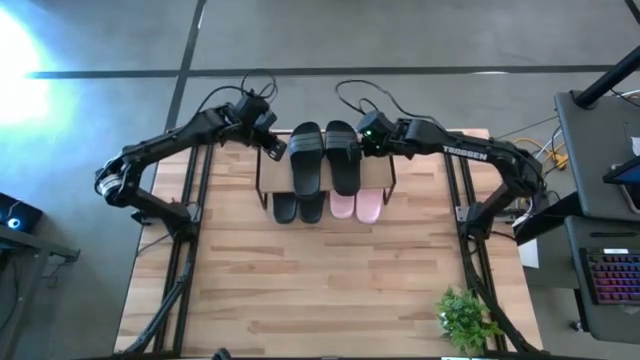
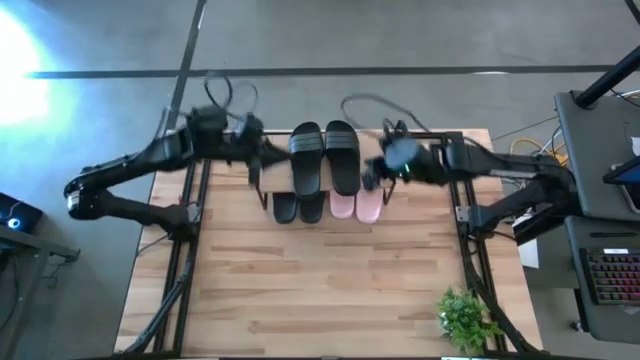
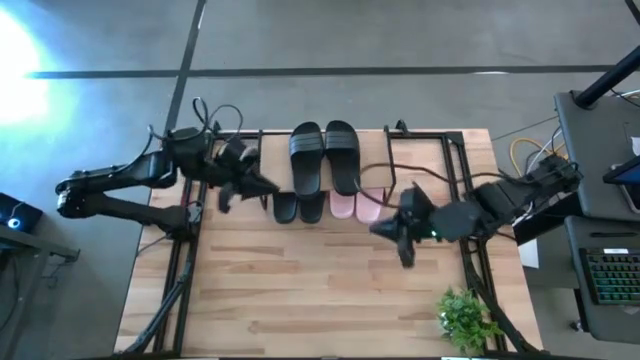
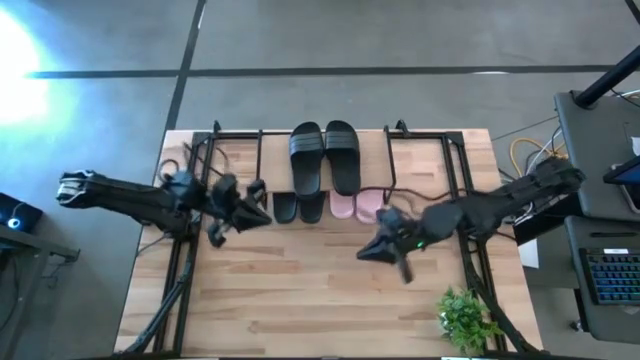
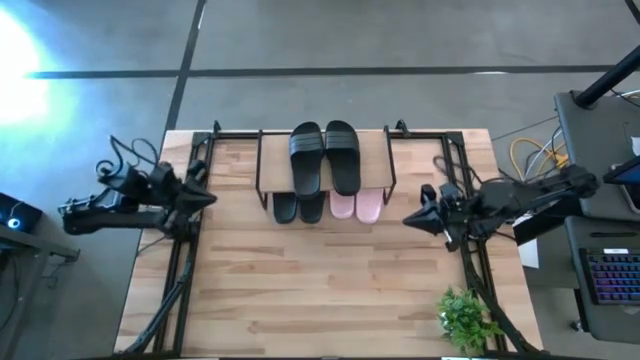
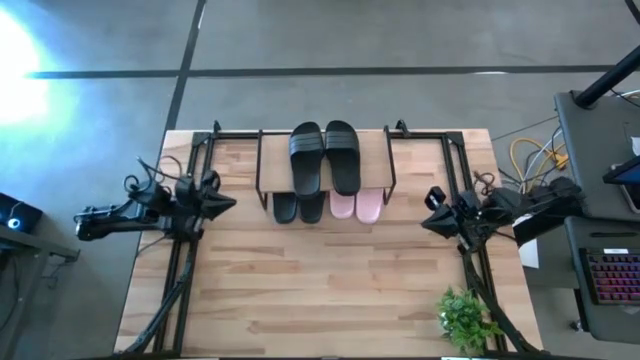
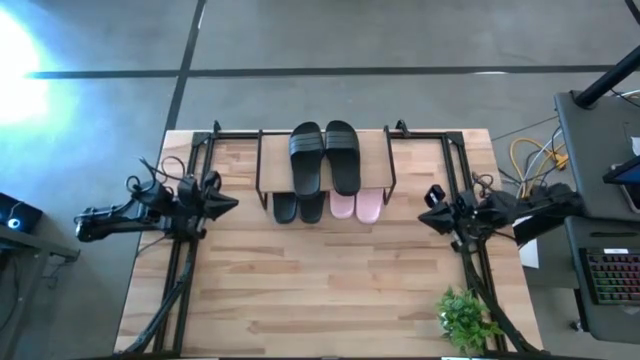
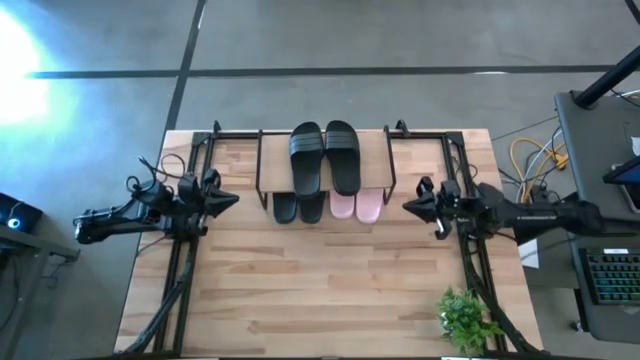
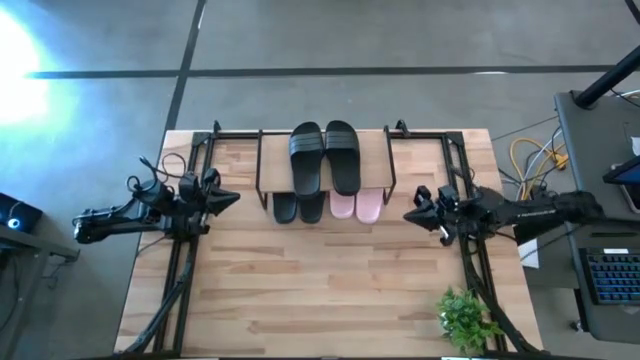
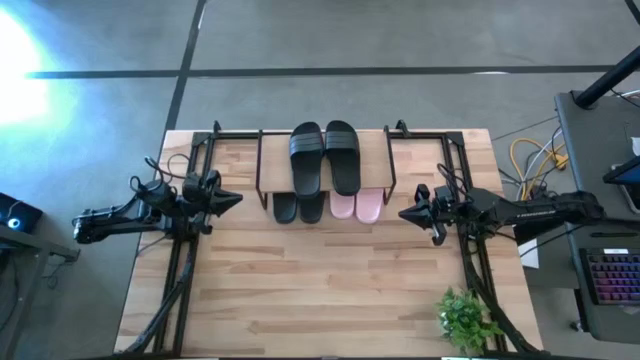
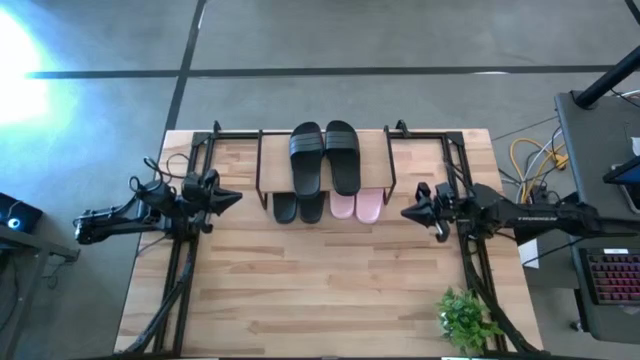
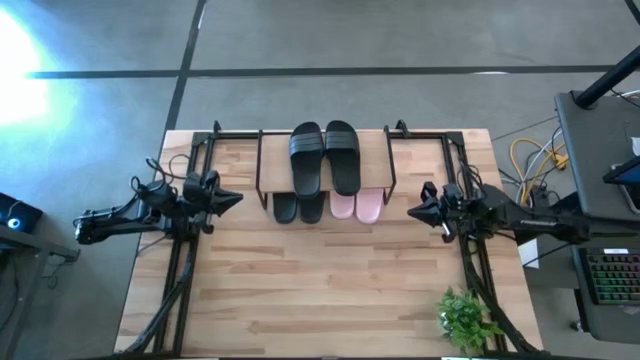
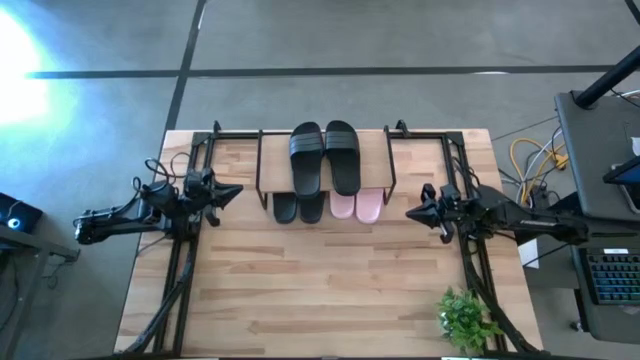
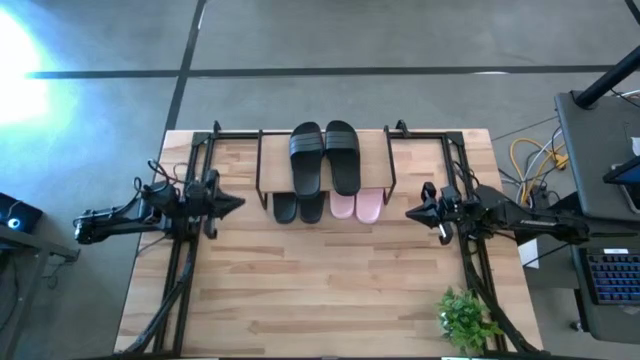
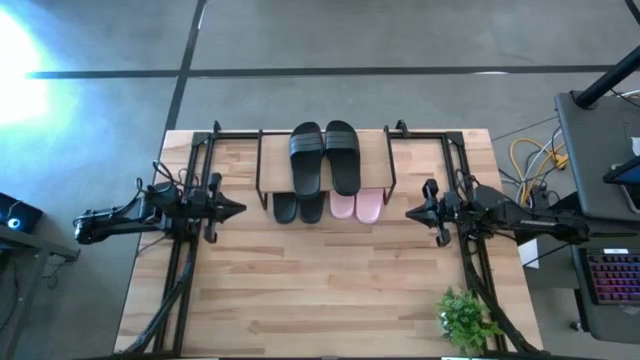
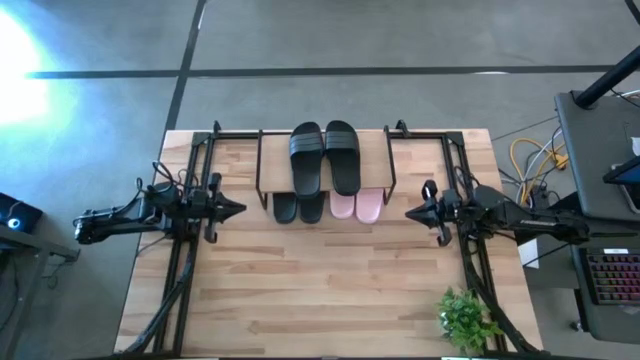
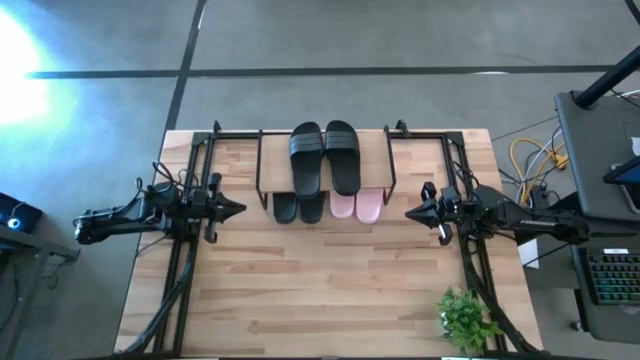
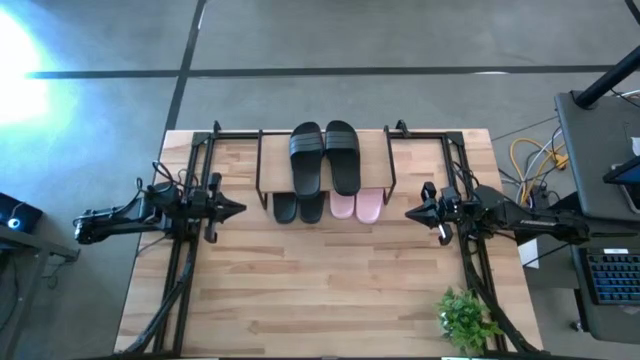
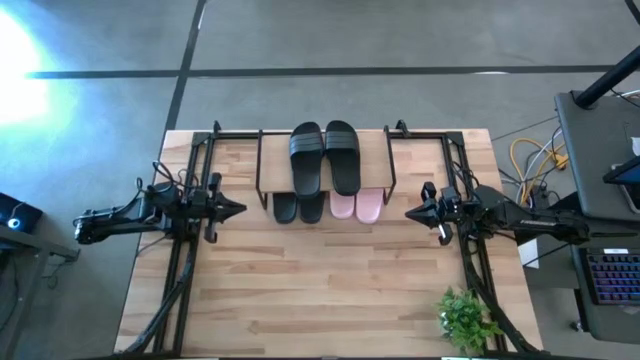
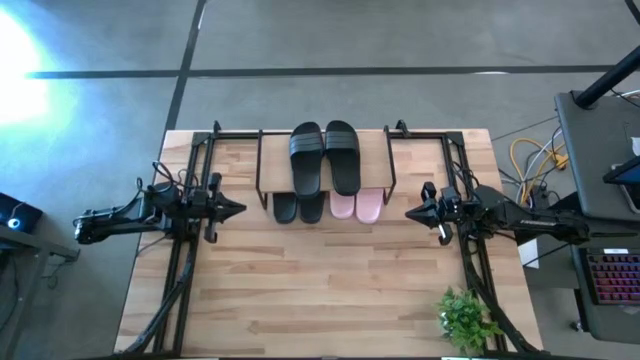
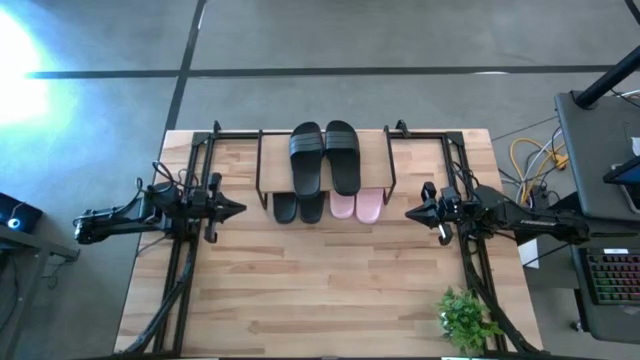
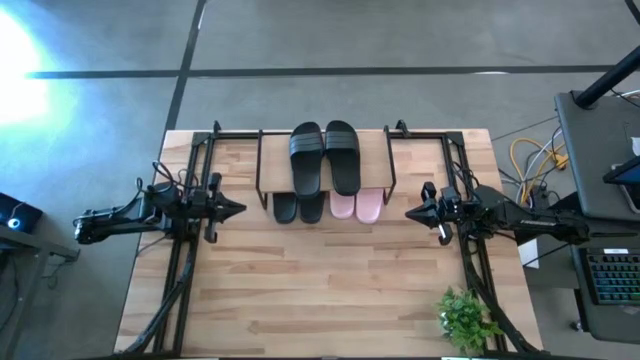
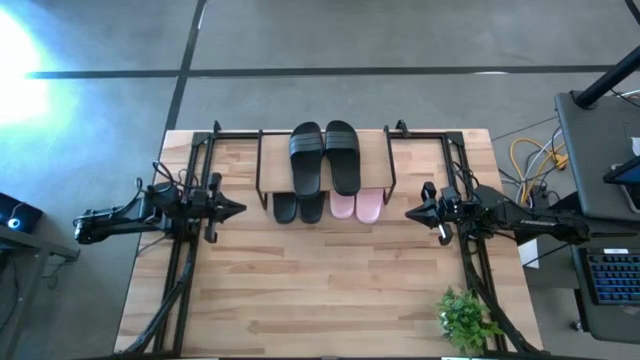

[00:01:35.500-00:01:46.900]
Task: Pick and place slides into the shelf
Return to Home Position

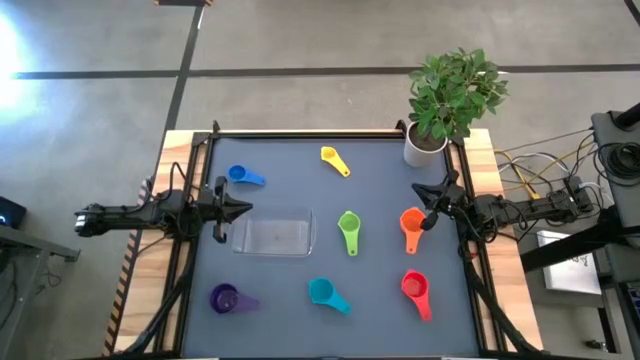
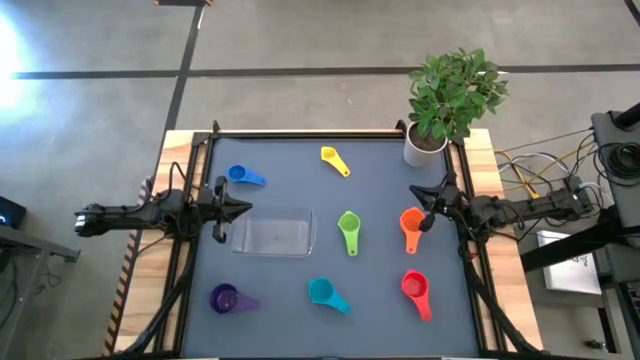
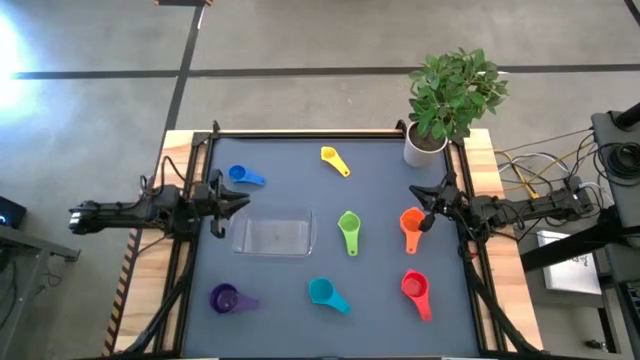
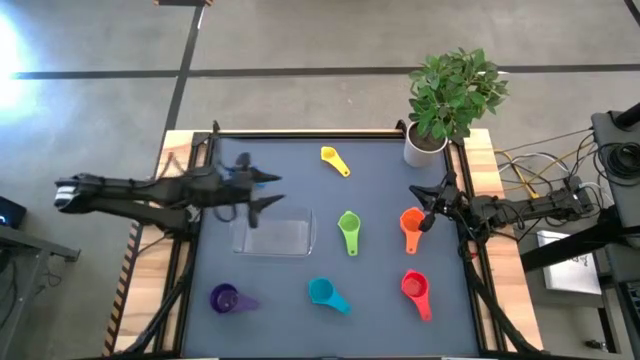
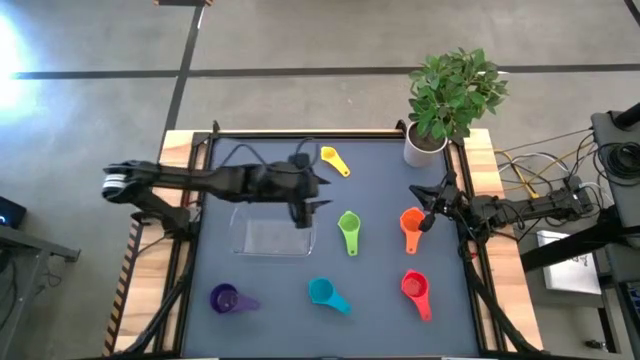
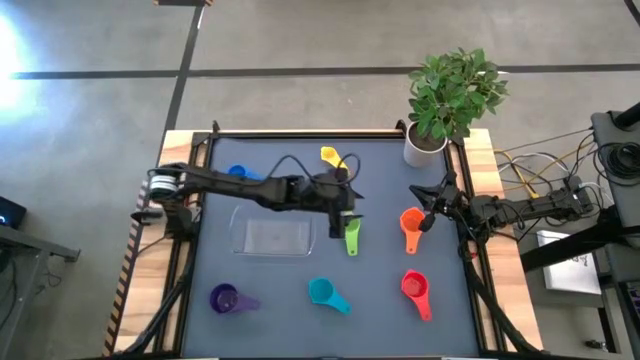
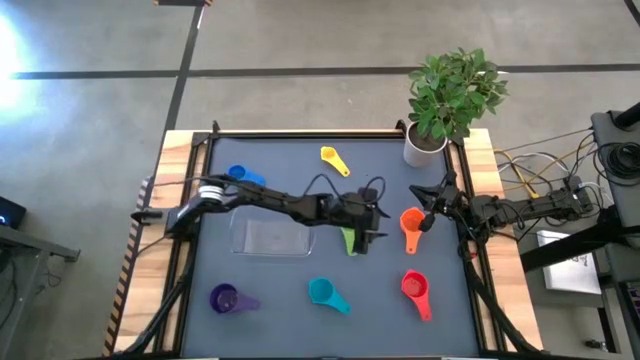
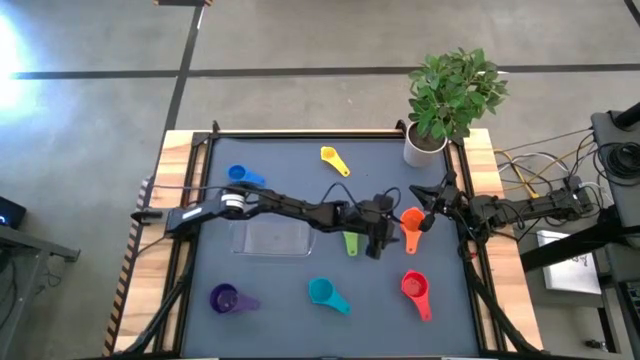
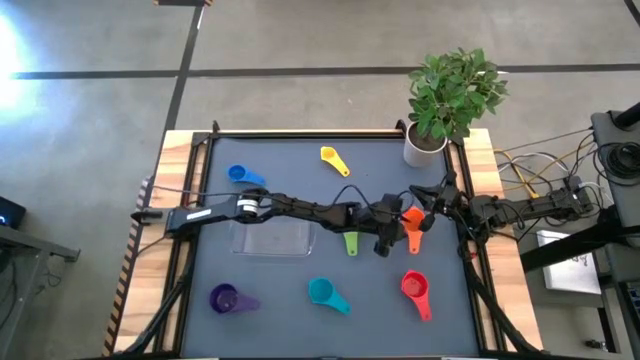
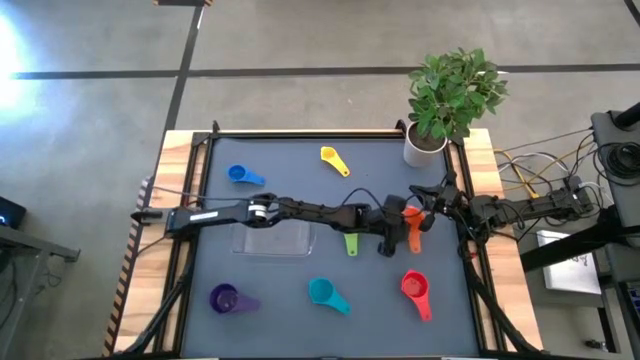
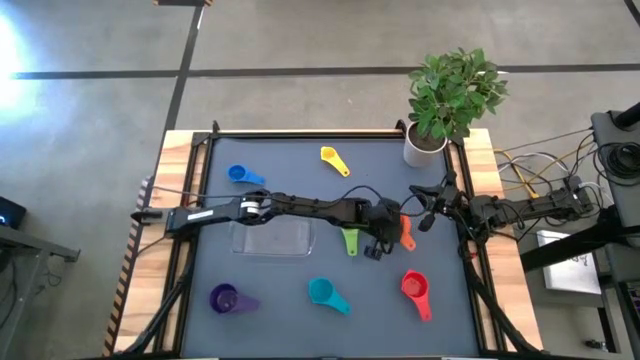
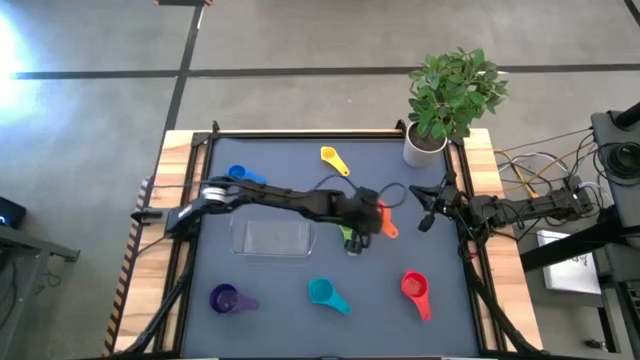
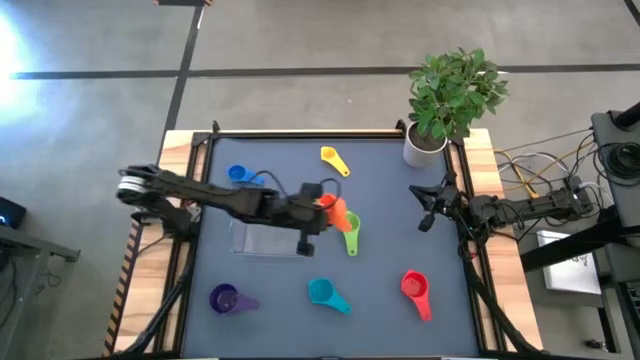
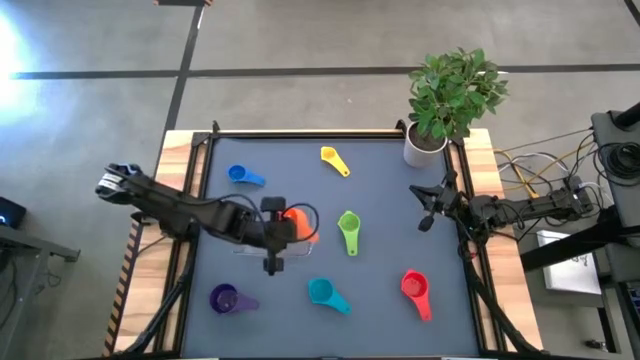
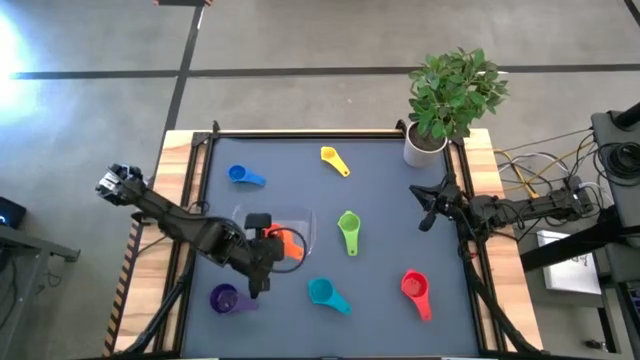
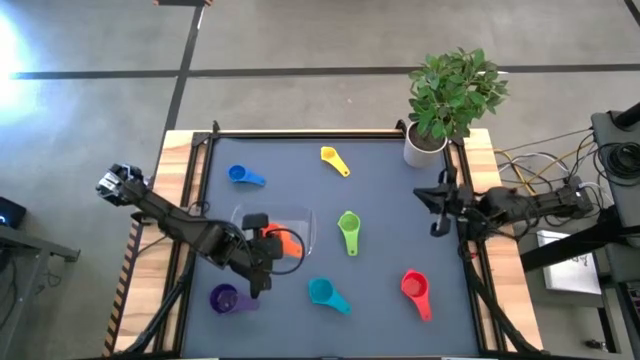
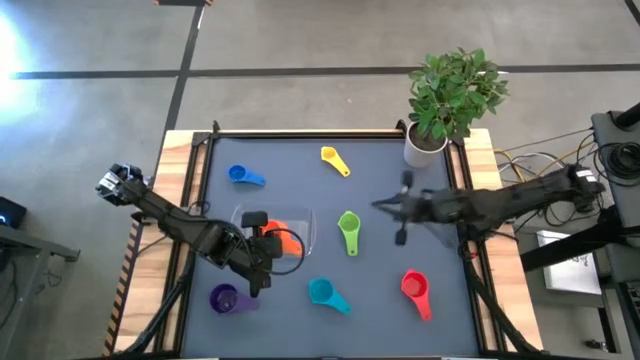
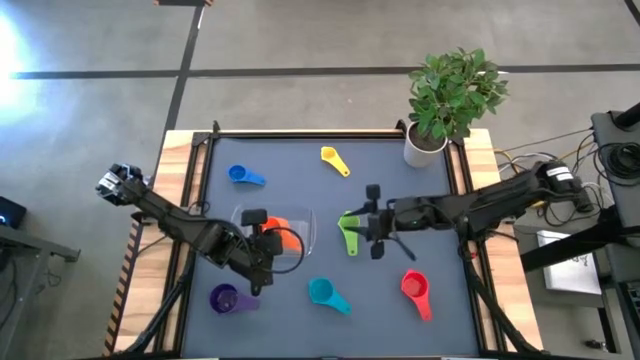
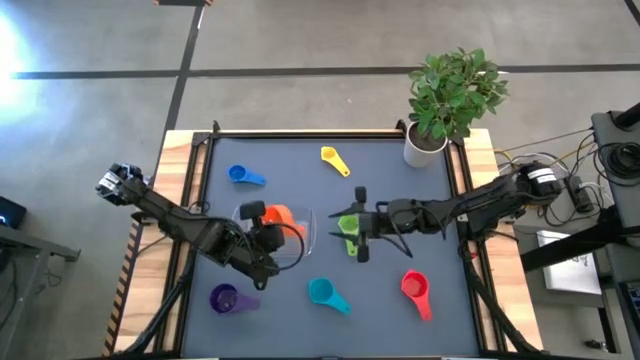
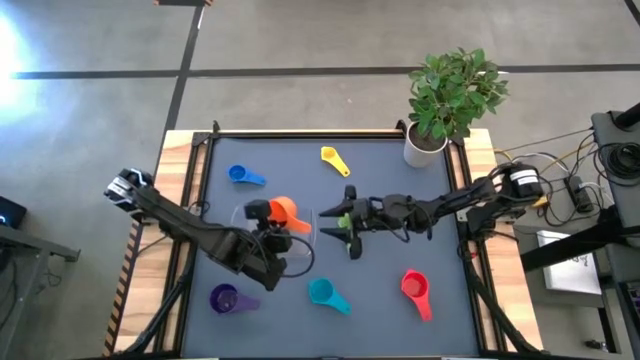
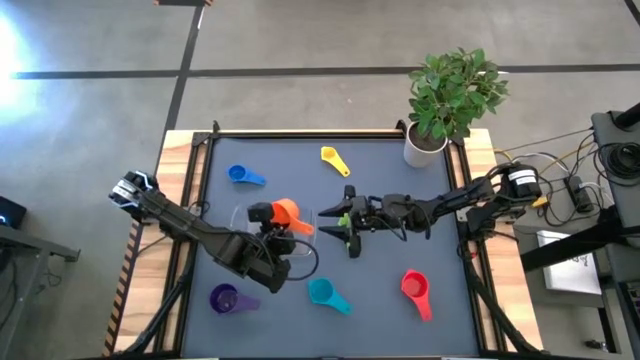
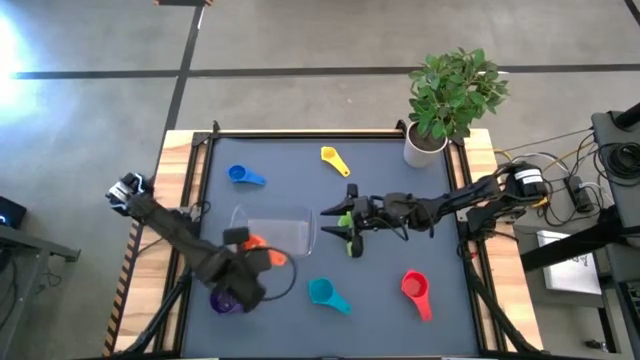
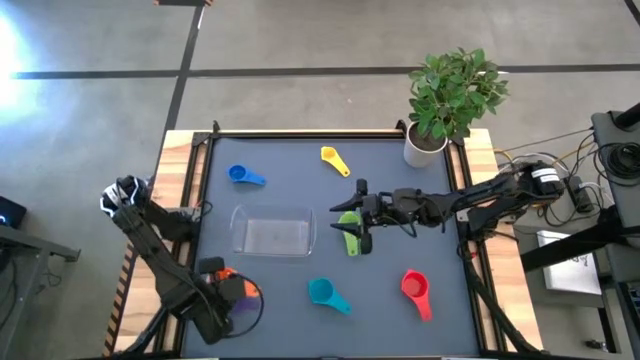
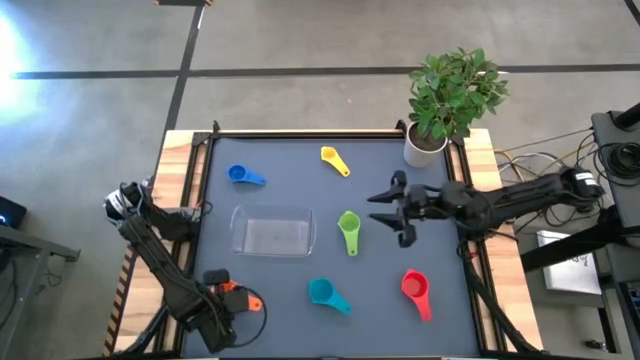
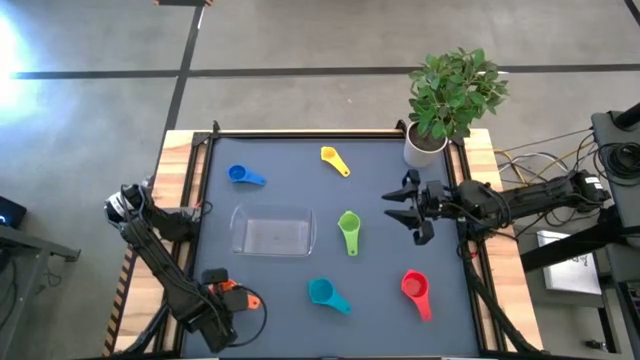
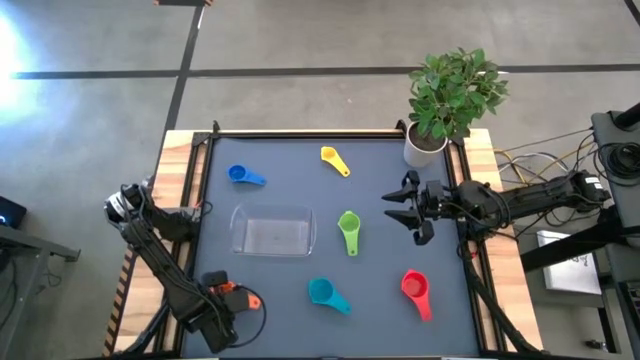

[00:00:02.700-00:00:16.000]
Task: Nest measuring cups in basket
Stack the orange measuring cup on the top of the purple measuring cup
